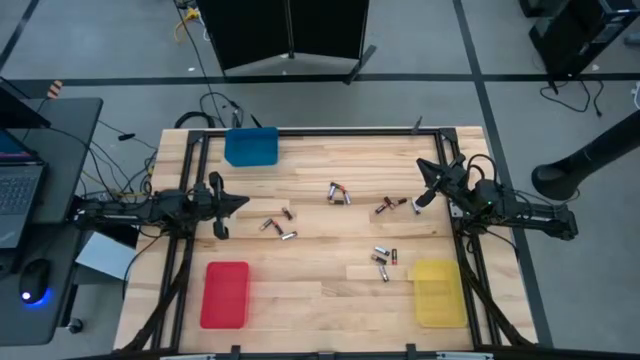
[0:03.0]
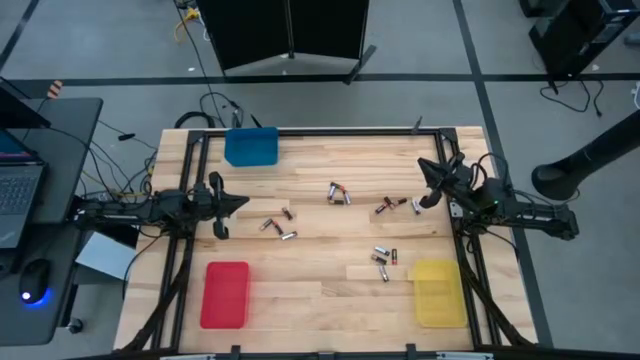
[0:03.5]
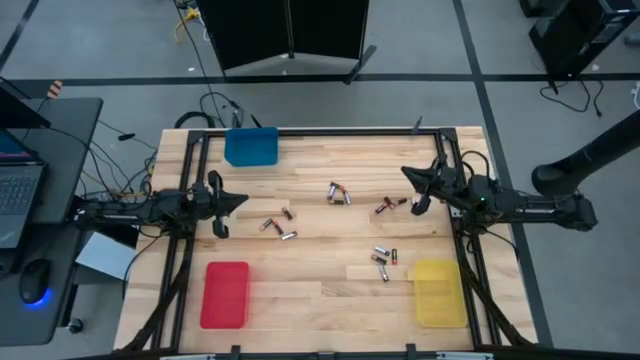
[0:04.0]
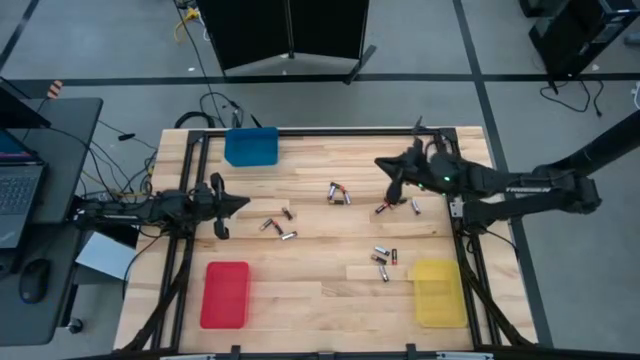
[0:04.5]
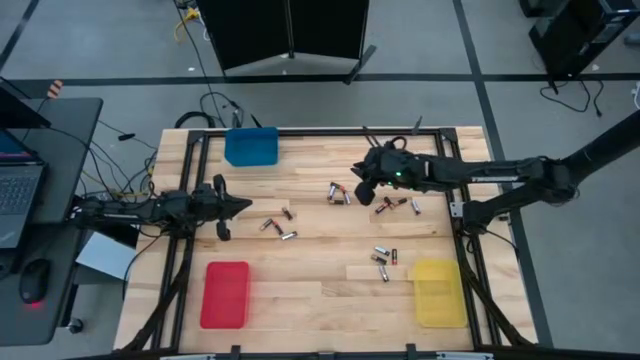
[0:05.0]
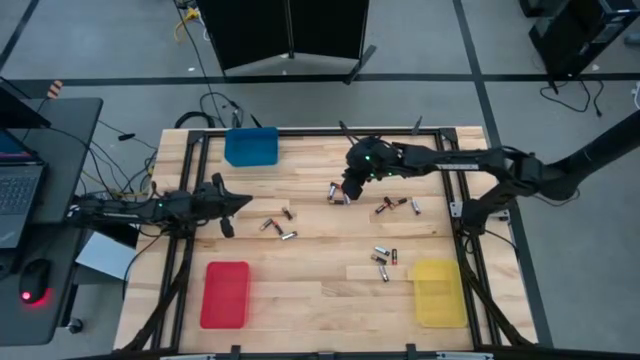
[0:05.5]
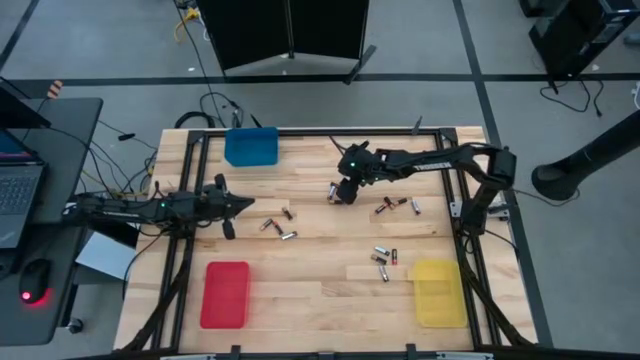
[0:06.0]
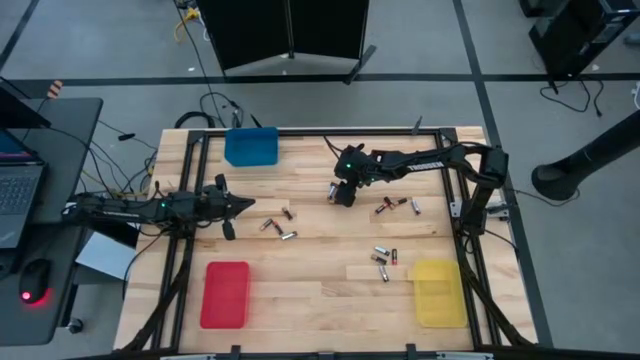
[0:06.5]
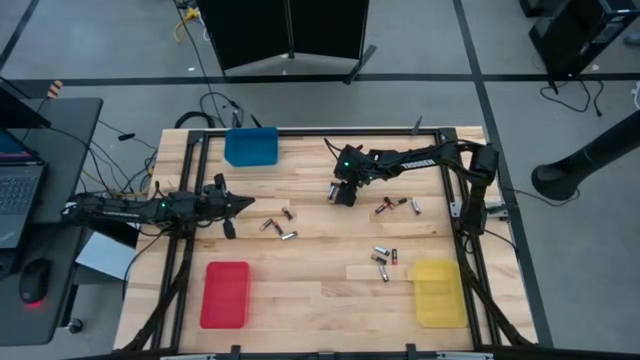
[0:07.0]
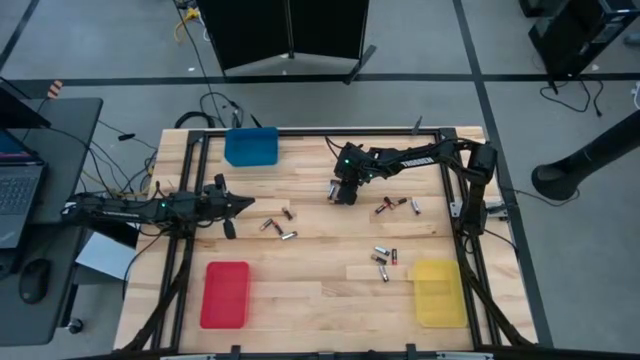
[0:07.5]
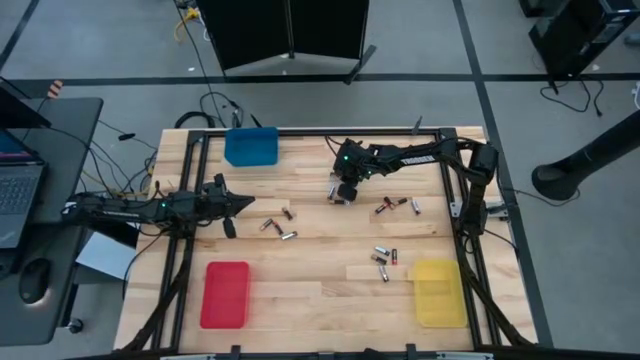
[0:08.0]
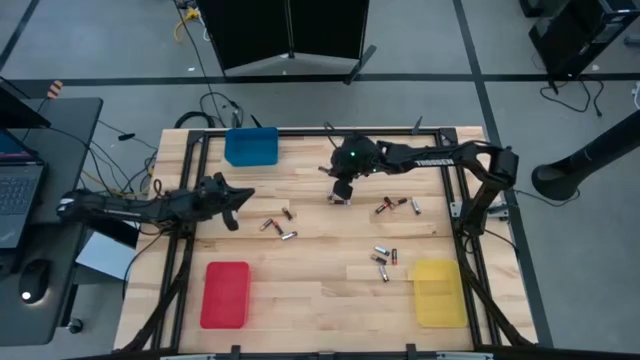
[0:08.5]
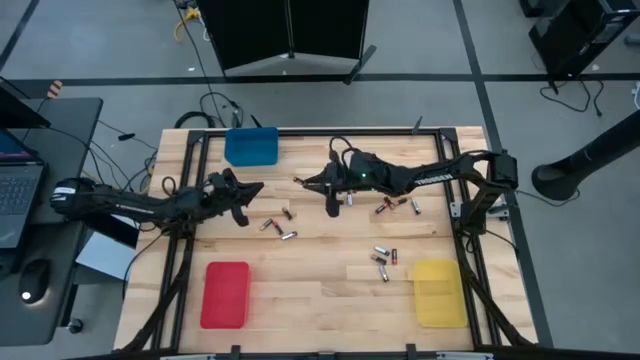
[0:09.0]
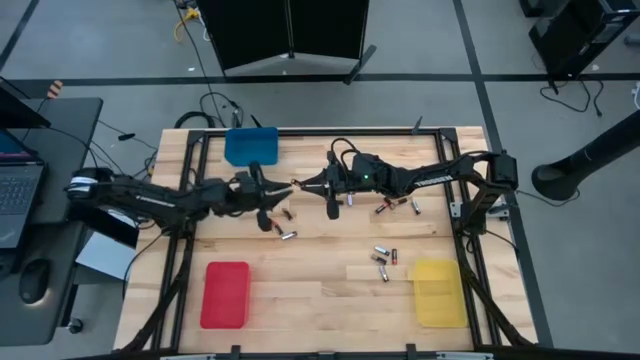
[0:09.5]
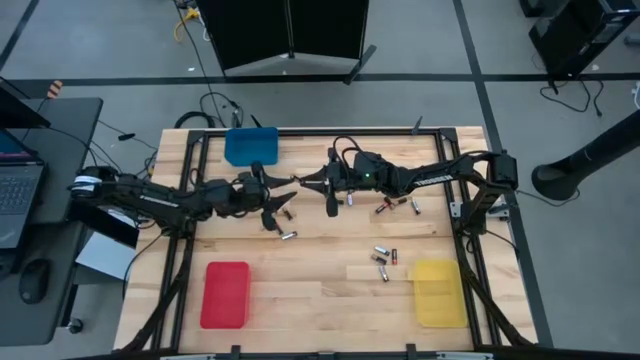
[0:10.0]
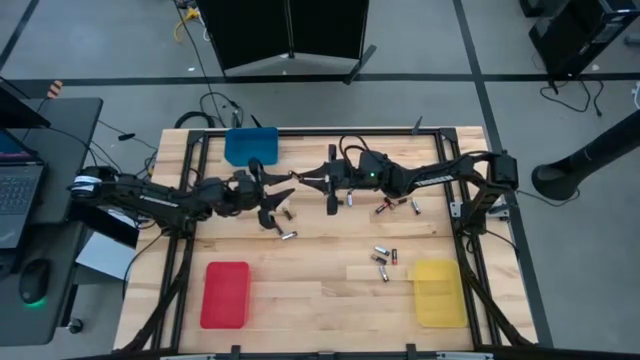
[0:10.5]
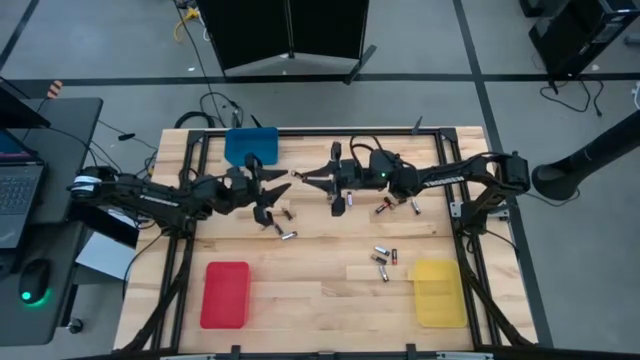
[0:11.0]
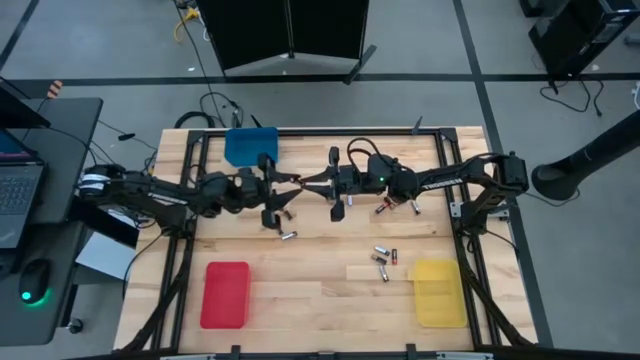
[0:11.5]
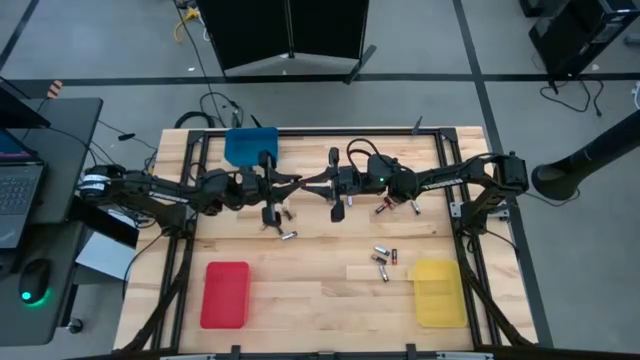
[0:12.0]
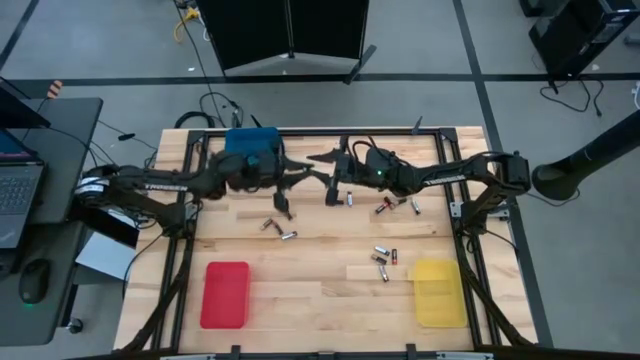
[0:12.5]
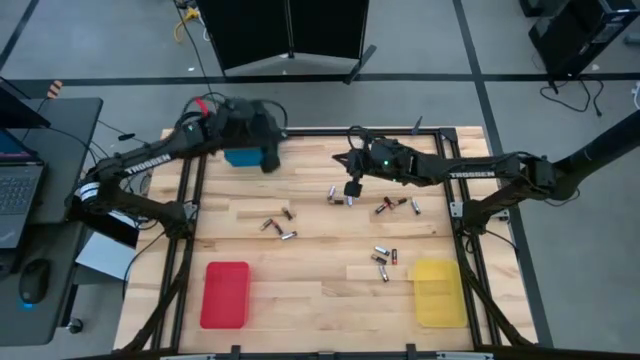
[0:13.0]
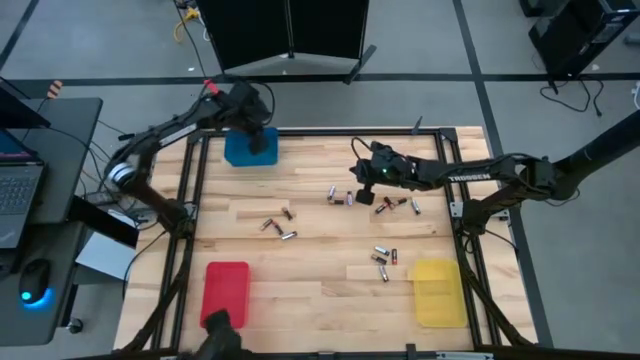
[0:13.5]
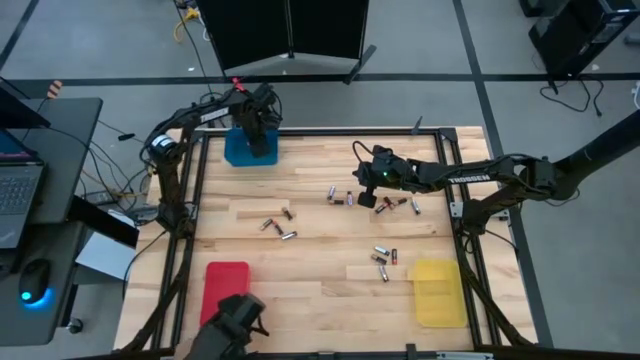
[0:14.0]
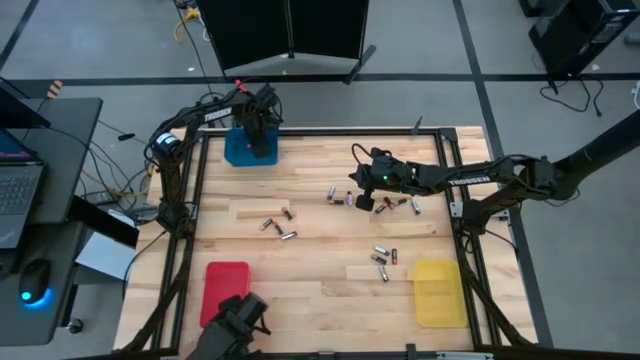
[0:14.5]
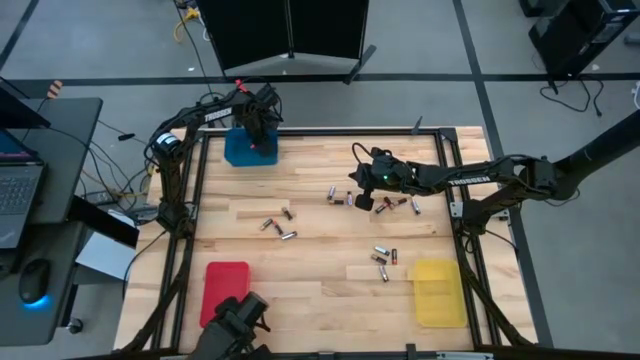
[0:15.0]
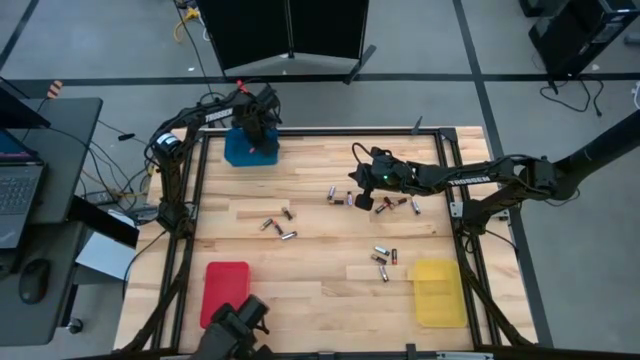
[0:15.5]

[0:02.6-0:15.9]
Task: Sort batteries
Put the red battery into the blue bin

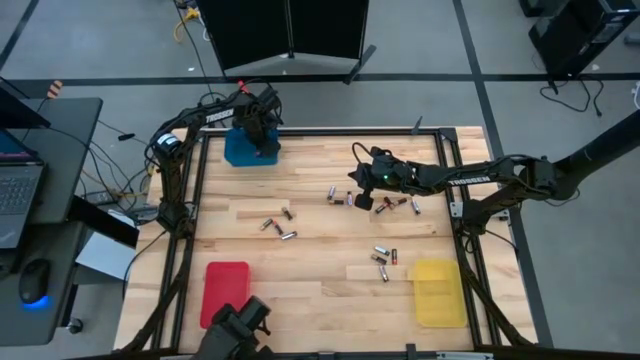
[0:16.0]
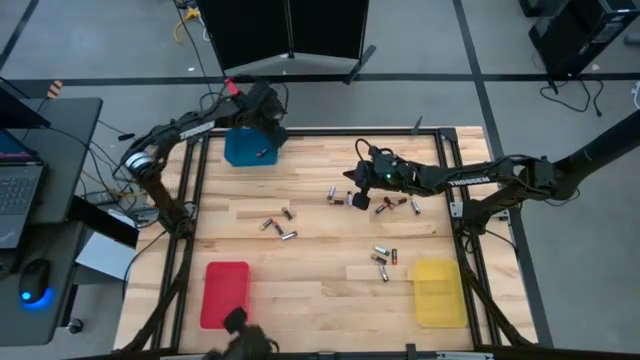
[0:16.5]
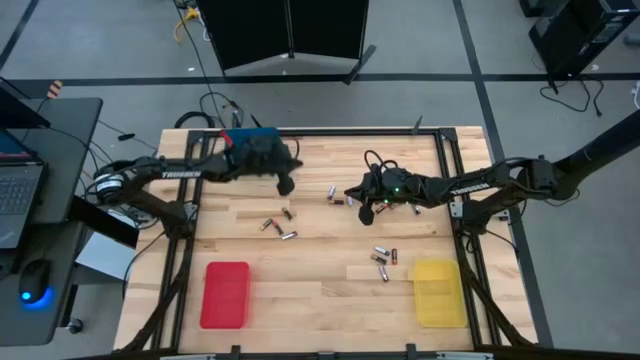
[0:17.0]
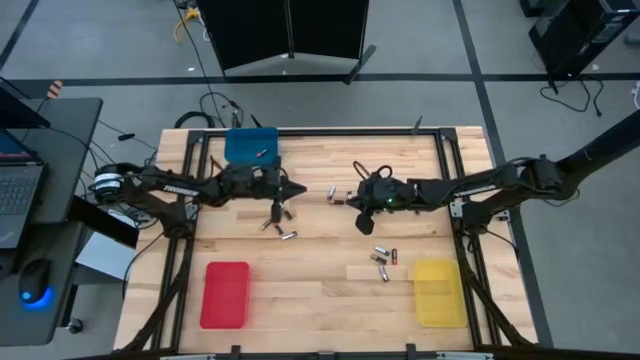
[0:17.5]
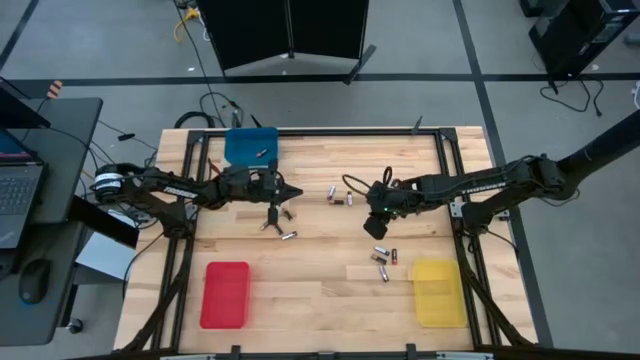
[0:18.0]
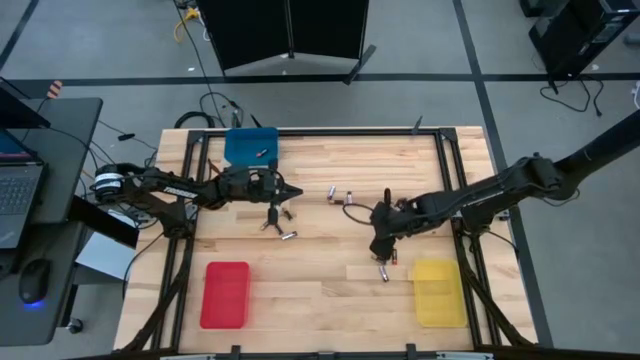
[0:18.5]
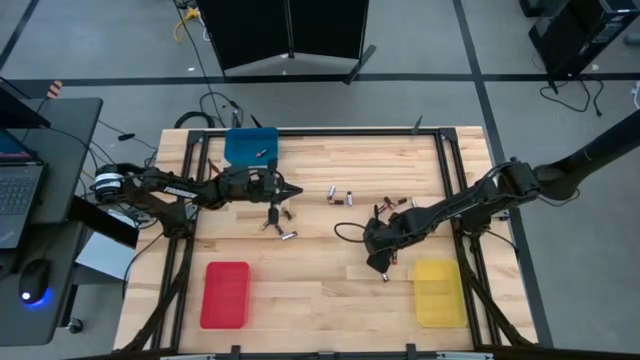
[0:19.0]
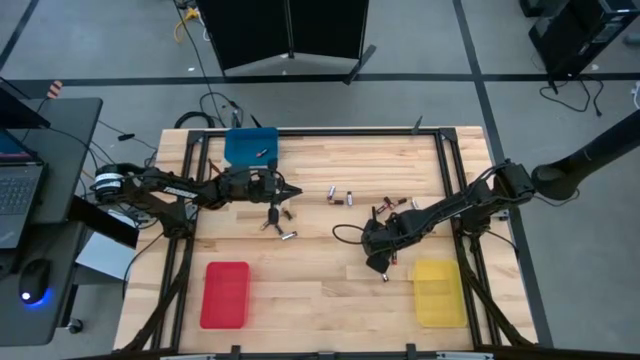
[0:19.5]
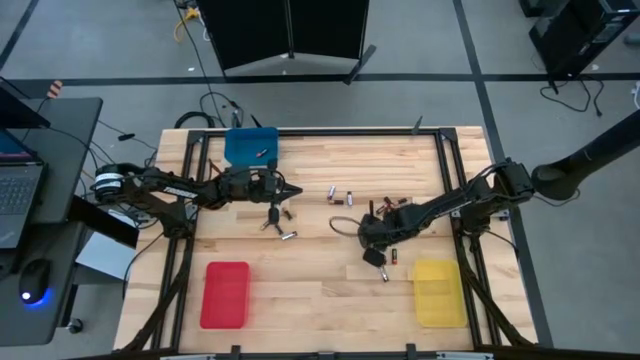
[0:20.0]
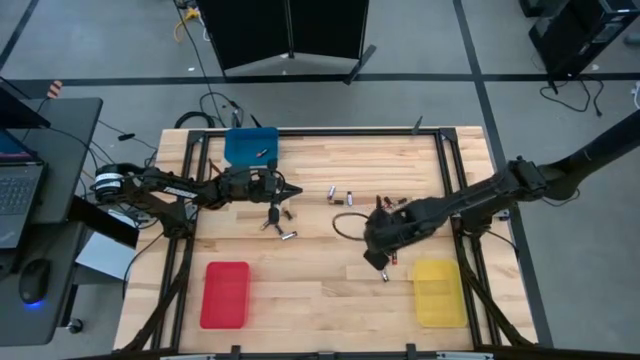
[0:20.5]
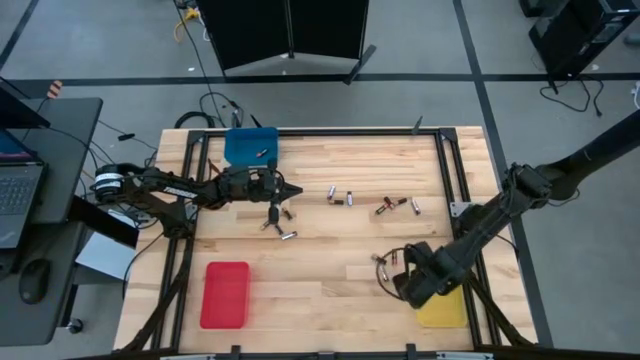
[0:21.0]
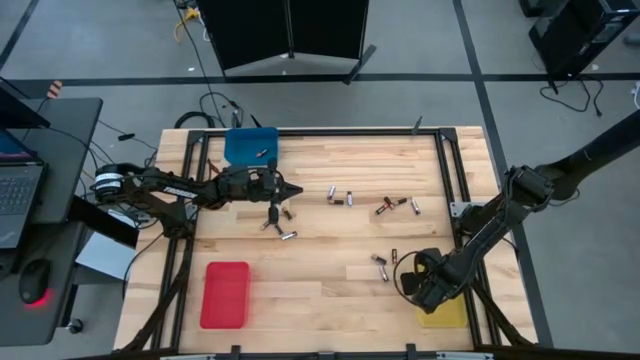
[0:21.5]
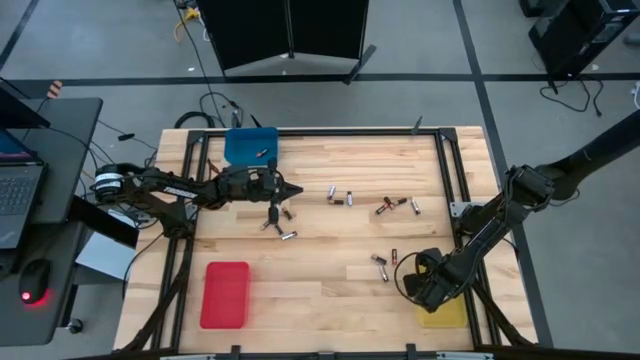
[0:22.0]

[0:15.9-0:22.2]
Put the silver battery into the yellow bin

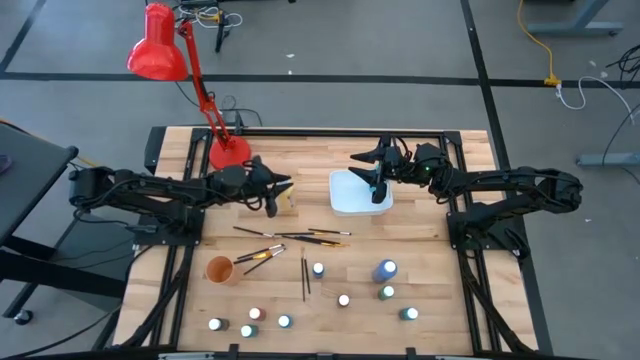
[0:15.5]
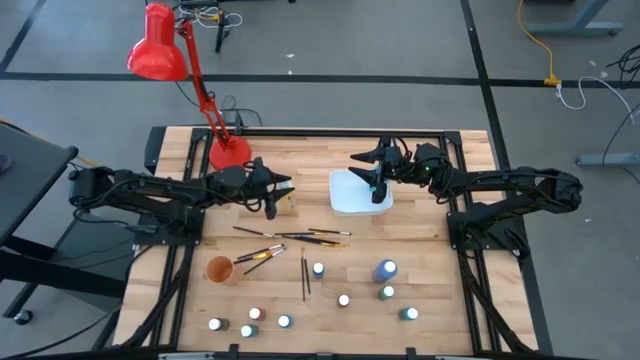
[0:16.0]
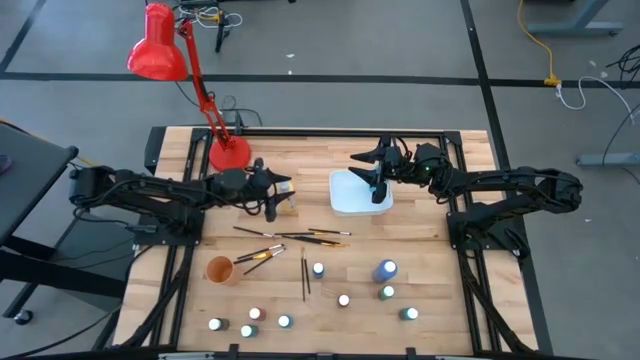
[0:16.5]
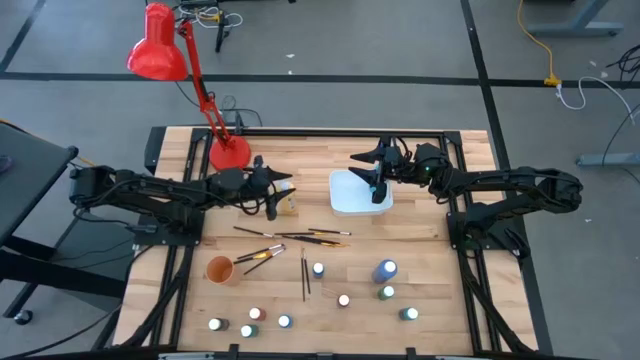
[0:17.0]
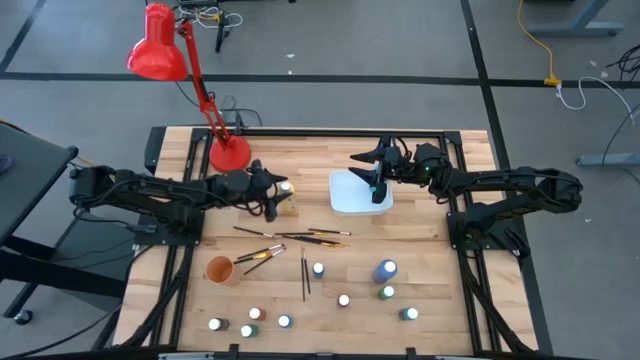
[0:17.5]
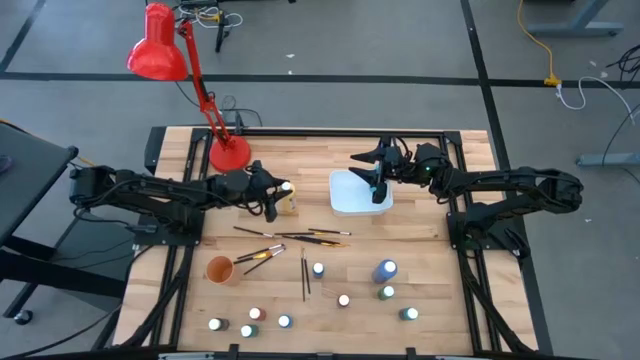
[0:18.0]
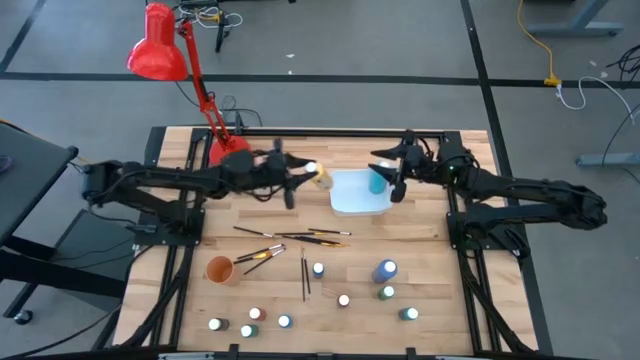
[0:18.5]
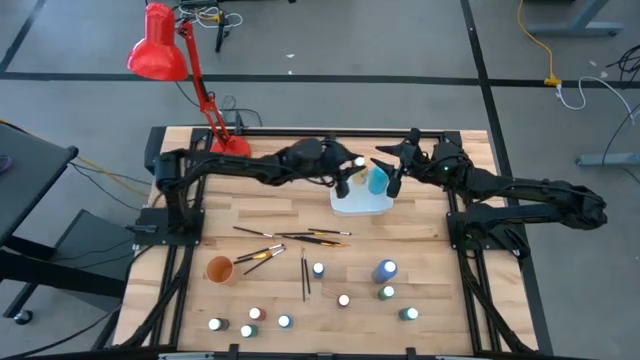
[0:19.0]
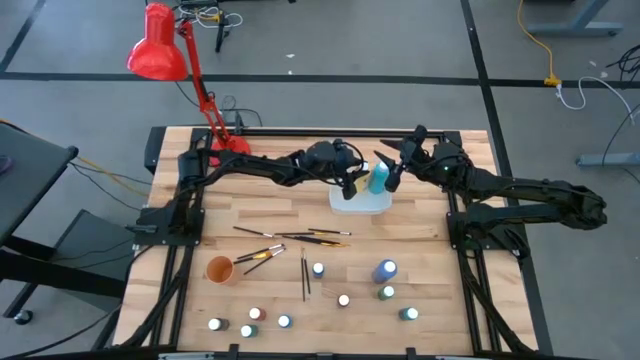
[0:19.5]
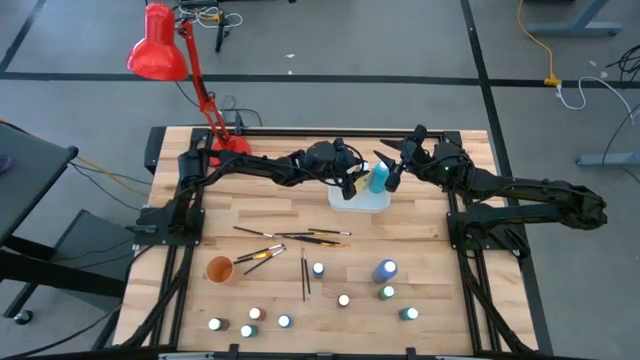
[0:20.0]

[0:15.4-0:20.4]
Task: Pick & Place Paint Supplies
Put the large yellow paint bottle into the white bin
